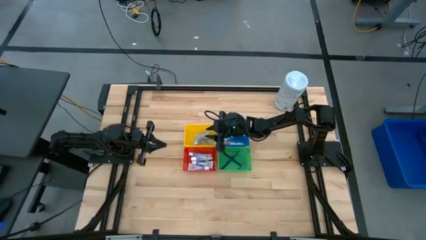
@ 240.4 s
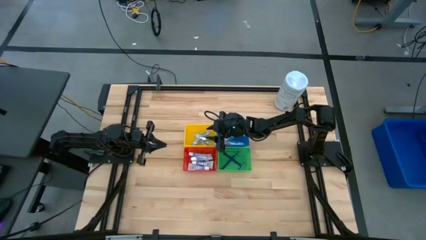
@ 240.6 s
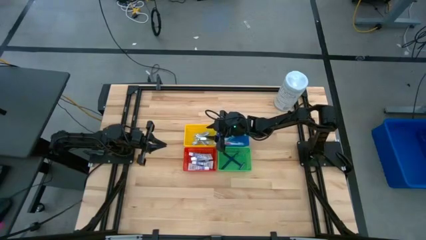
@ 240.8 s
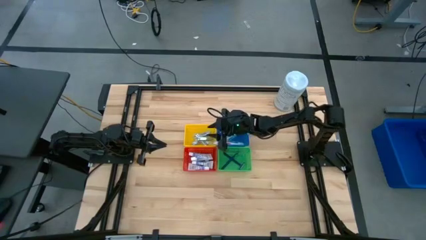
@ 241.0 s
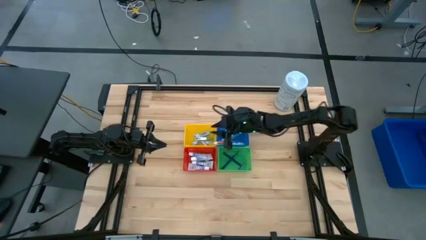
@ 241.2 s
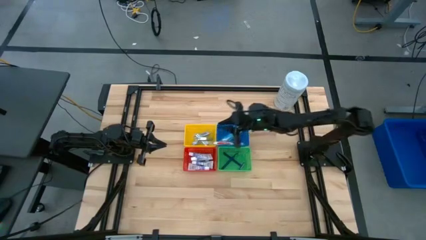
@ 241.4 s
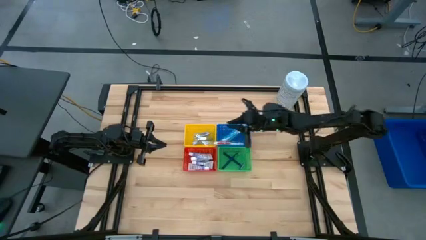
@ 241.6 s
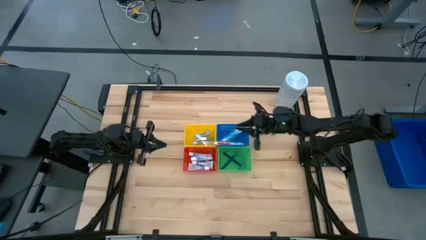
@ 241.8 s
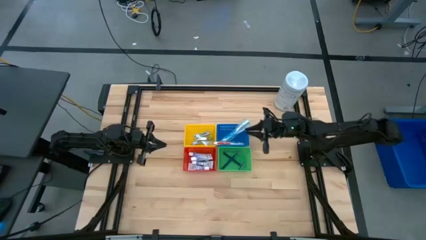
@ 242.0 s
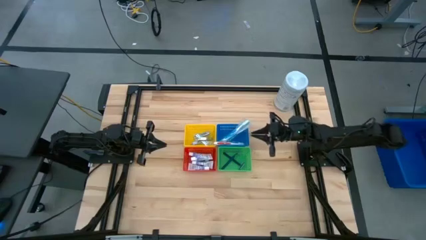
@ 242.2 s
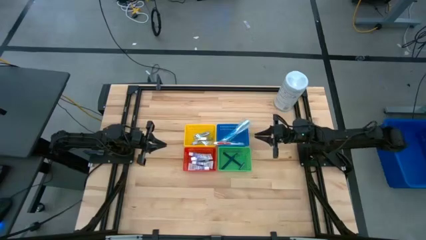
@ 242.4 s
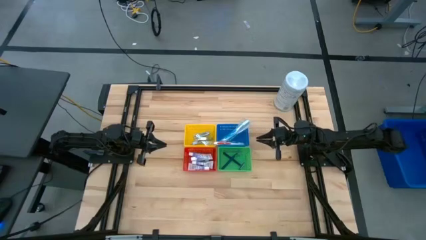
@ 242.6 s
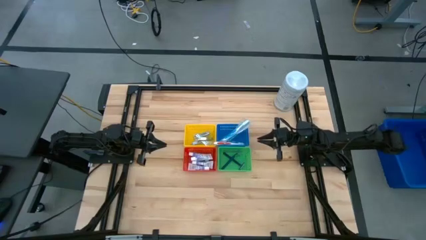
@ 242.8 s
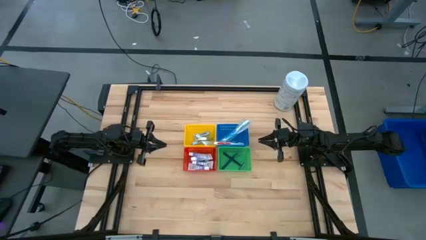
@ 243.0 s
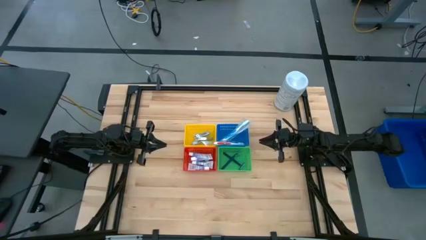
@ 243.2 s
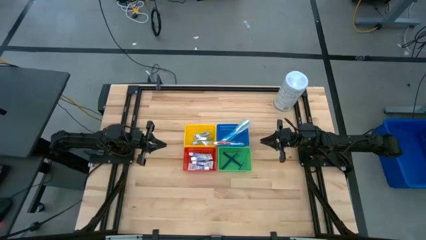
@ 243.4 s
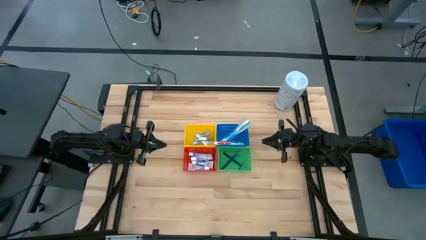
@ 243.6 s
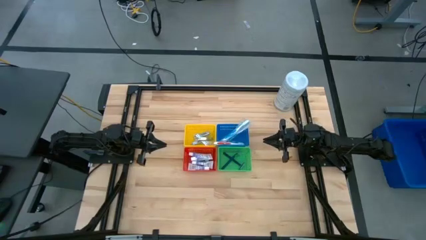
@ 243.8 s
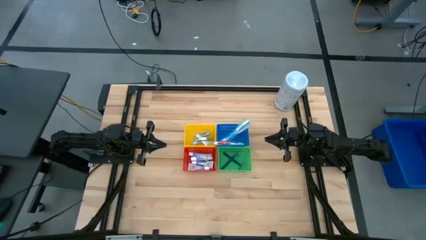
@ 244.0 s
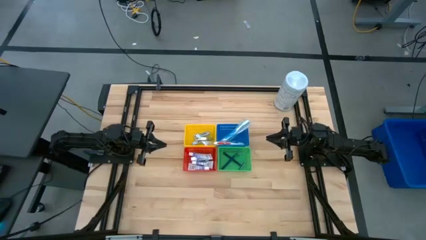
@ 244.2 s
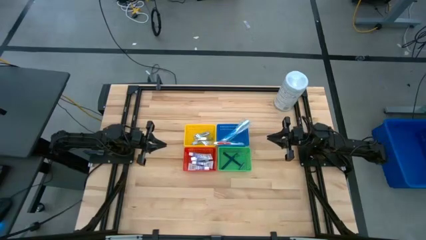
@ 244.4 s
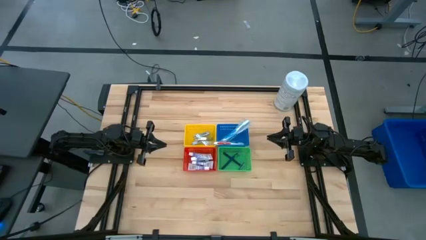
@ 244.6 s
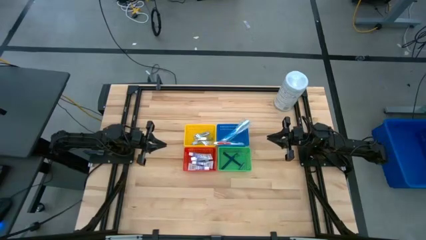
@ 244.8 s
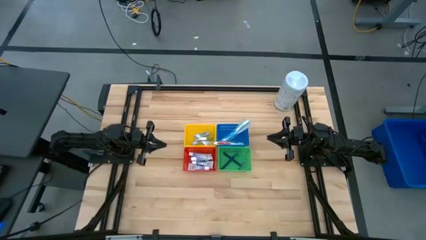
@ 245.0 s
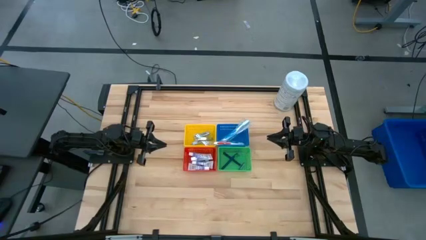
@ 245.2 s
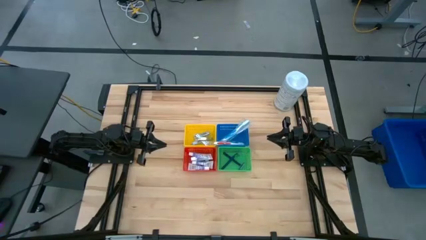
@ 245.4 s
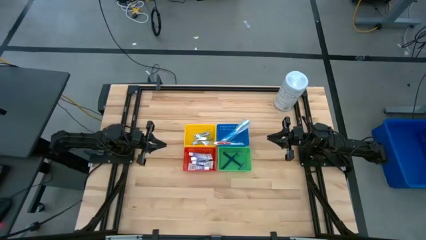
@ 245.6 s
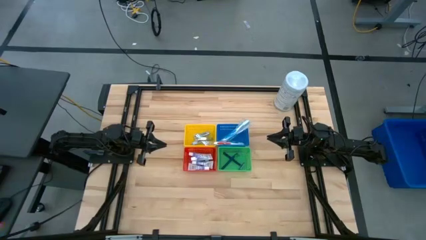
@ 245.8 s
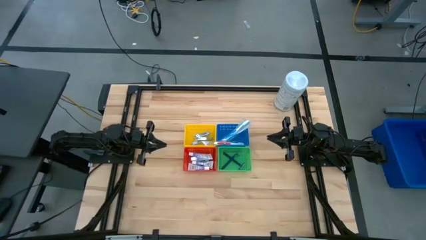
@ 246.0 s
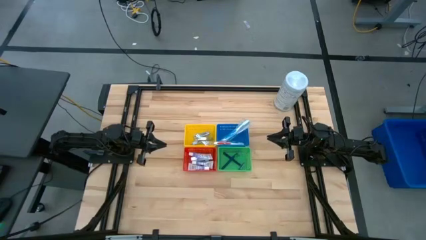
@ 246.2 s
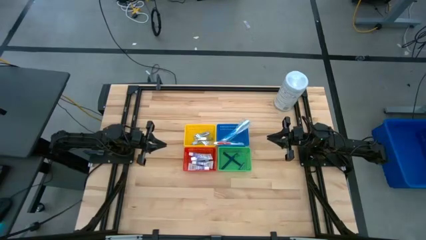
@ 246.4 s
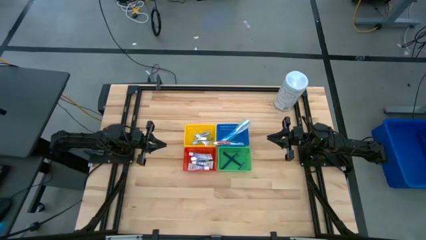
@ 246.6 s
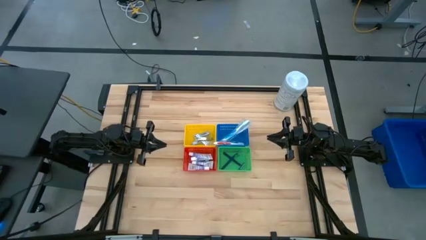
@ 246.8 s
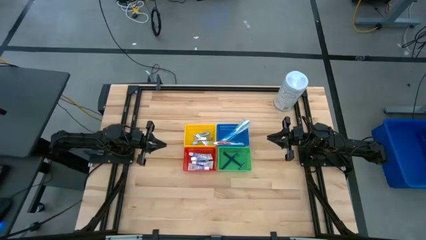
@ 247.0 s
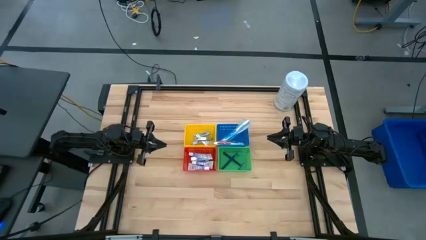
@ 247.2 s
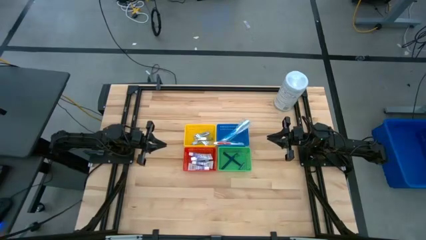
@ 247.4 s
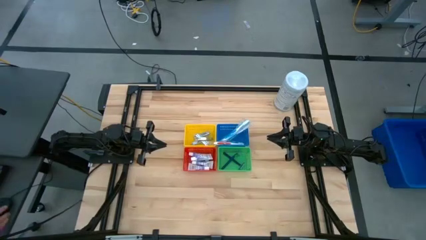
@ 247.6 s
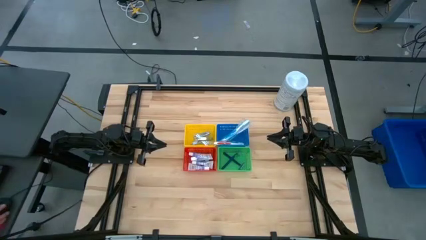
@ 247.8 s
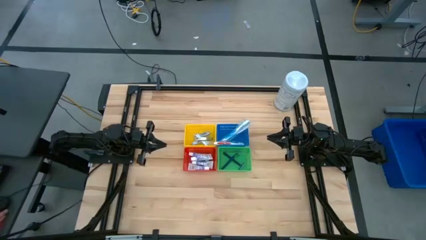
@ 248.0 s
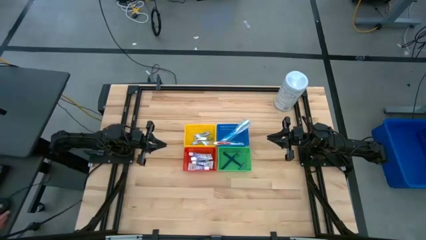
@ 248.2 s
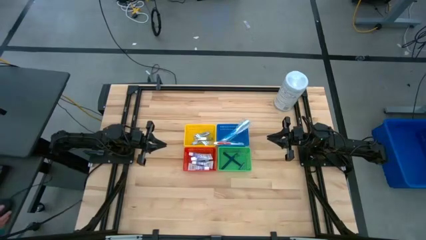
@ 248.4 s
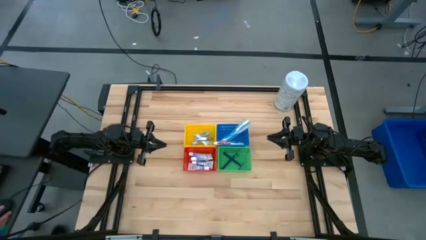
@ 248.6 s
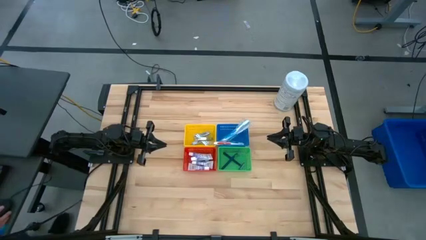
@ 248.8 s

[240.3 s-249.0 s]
Task: Pick & Place Travel size toiletries
Return to Home Position

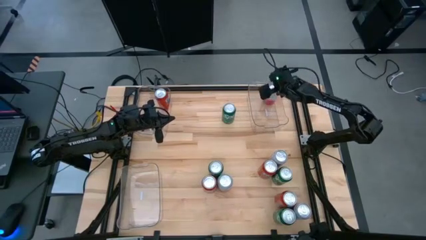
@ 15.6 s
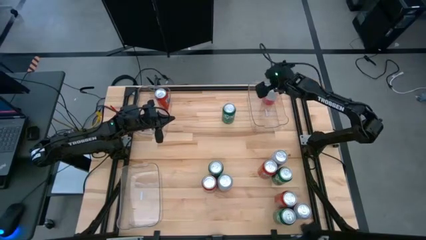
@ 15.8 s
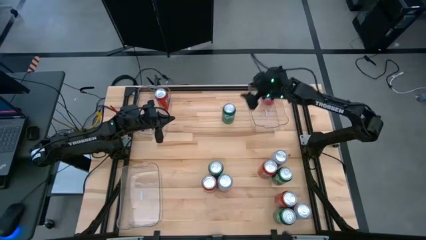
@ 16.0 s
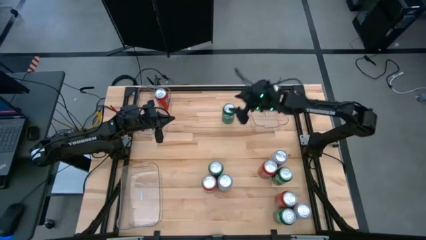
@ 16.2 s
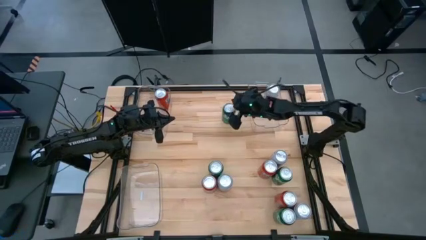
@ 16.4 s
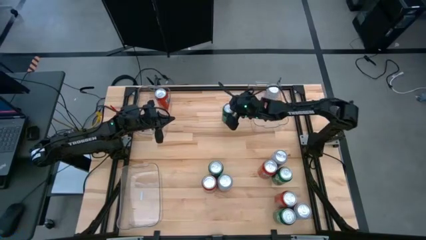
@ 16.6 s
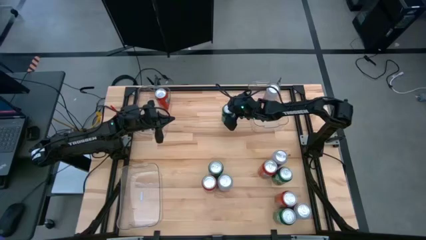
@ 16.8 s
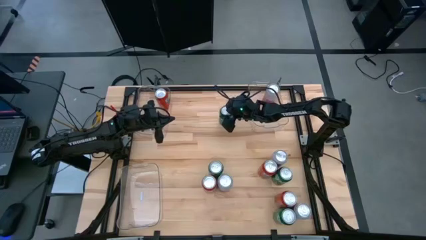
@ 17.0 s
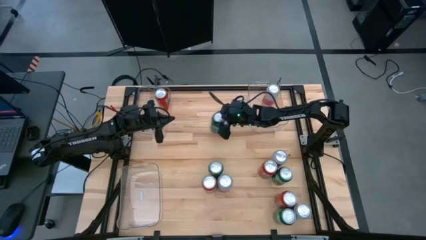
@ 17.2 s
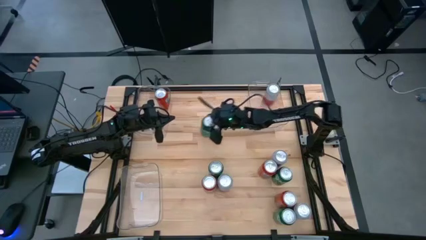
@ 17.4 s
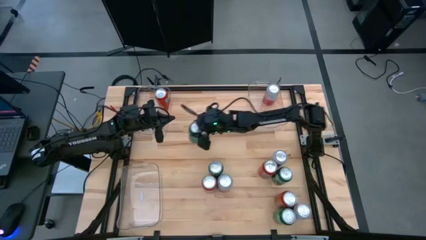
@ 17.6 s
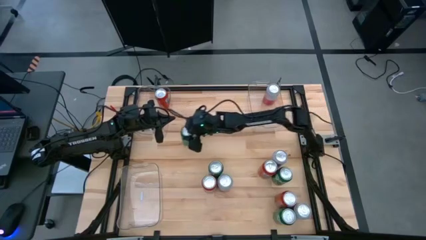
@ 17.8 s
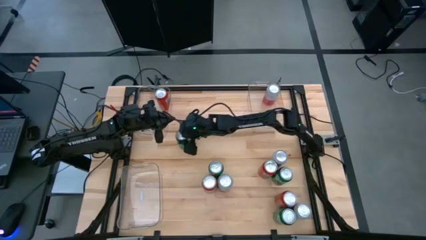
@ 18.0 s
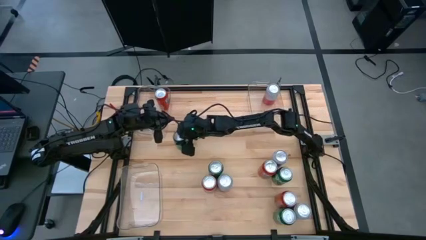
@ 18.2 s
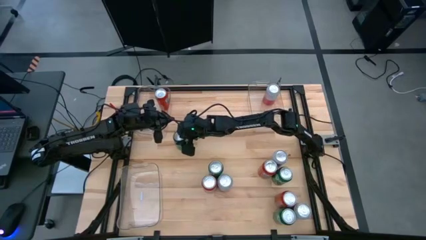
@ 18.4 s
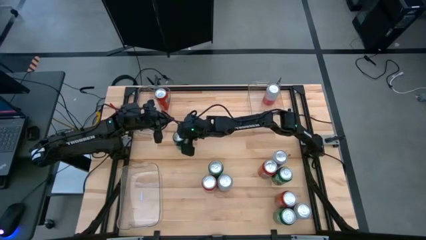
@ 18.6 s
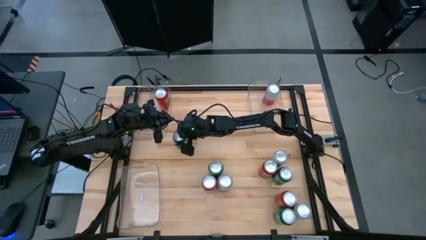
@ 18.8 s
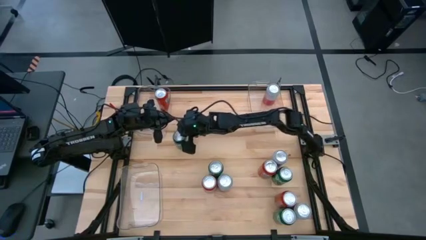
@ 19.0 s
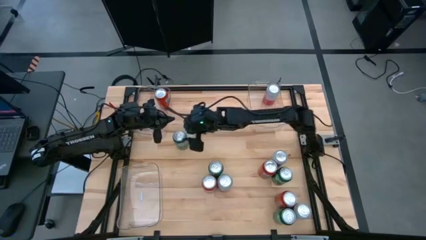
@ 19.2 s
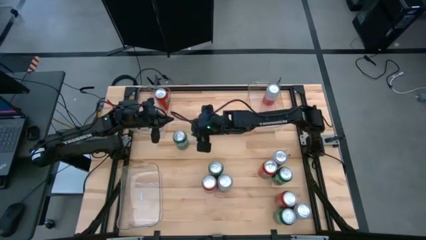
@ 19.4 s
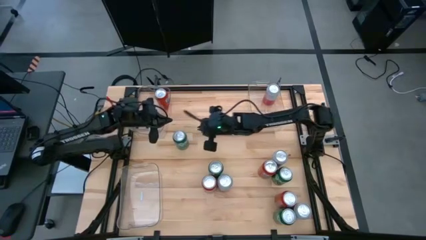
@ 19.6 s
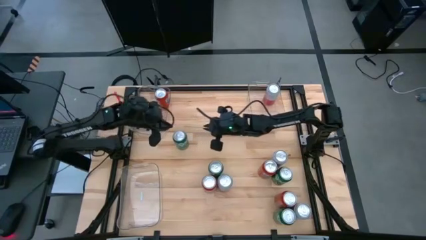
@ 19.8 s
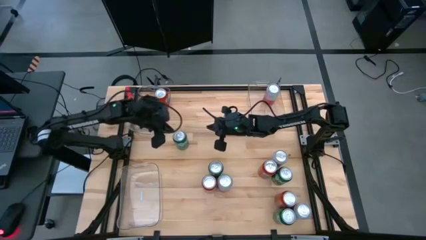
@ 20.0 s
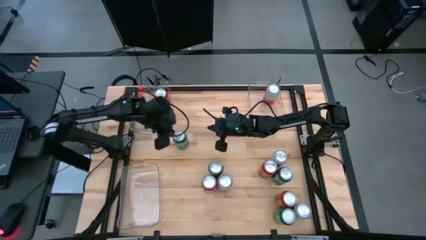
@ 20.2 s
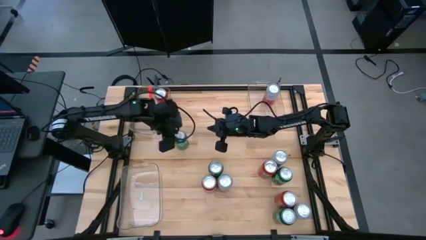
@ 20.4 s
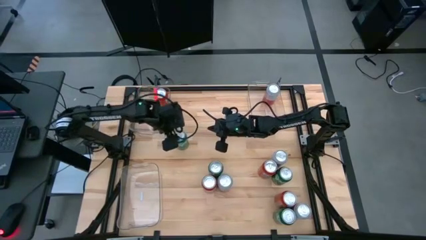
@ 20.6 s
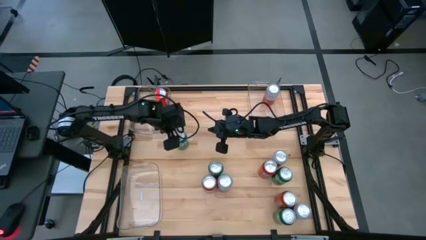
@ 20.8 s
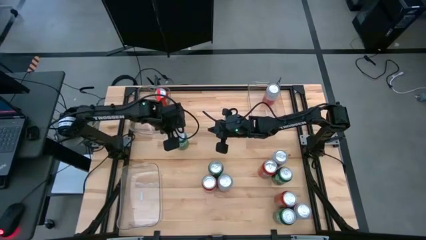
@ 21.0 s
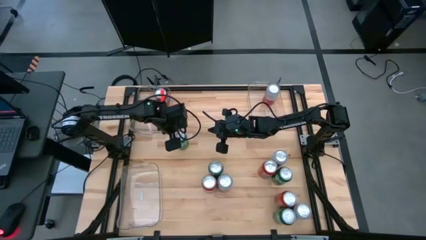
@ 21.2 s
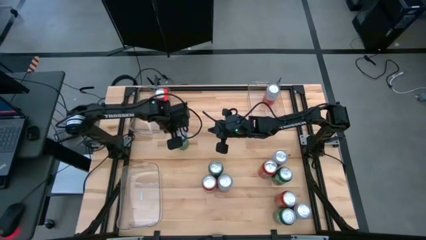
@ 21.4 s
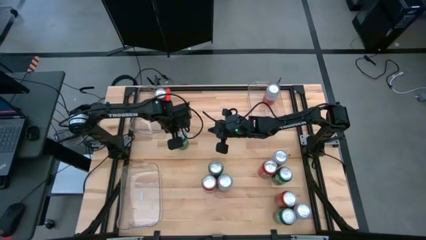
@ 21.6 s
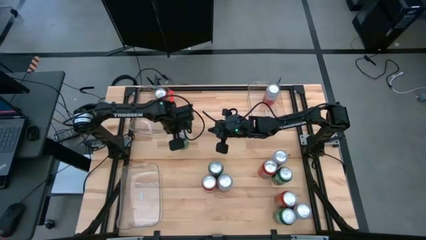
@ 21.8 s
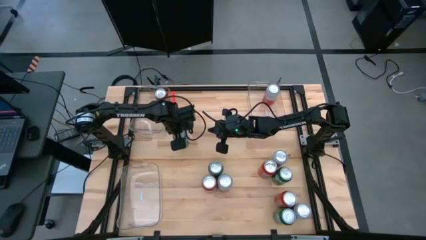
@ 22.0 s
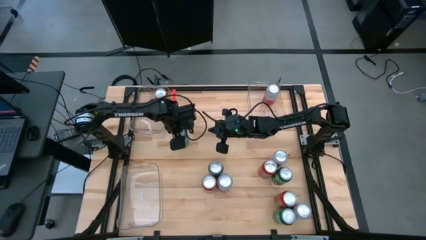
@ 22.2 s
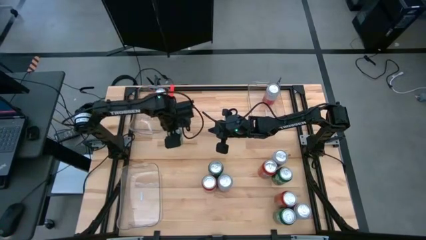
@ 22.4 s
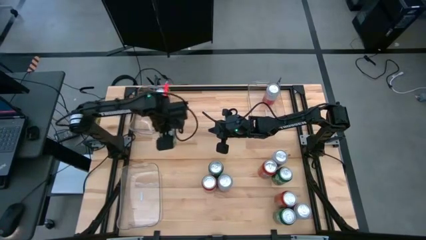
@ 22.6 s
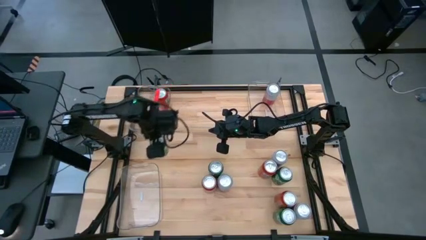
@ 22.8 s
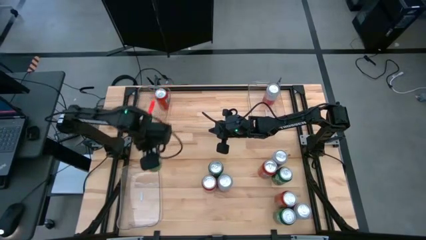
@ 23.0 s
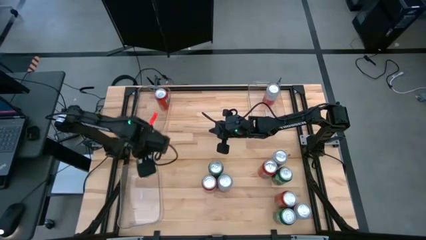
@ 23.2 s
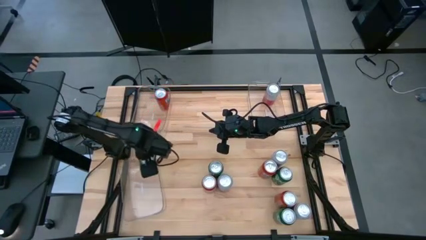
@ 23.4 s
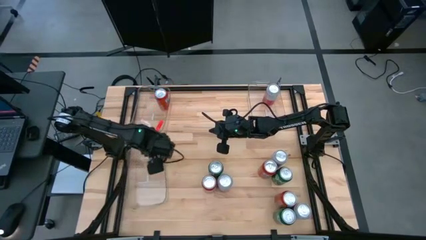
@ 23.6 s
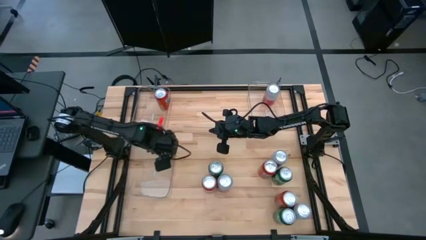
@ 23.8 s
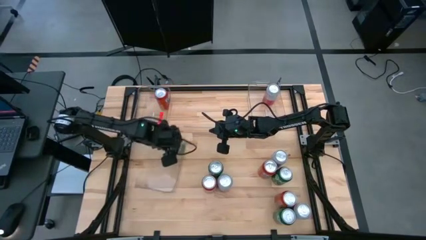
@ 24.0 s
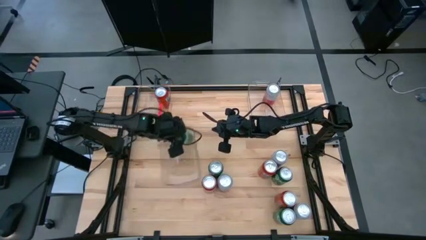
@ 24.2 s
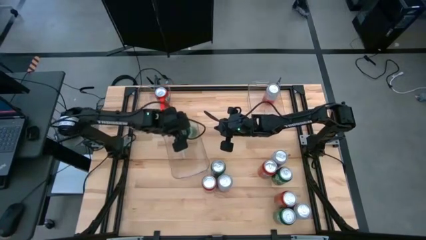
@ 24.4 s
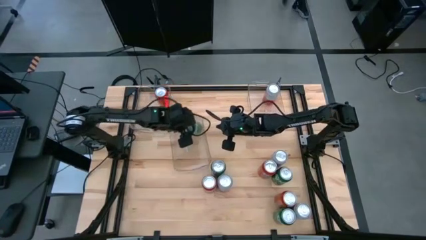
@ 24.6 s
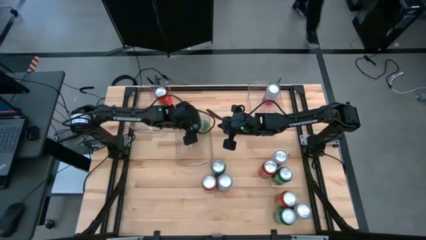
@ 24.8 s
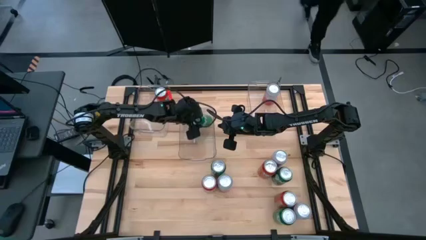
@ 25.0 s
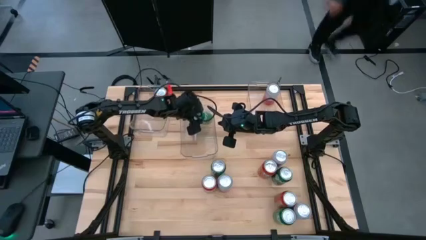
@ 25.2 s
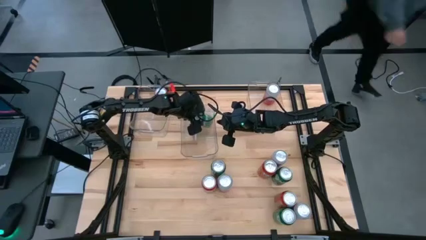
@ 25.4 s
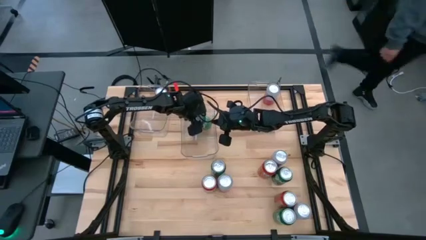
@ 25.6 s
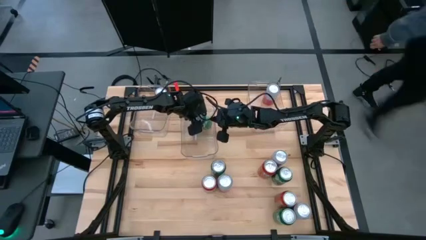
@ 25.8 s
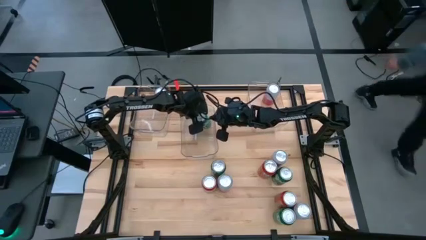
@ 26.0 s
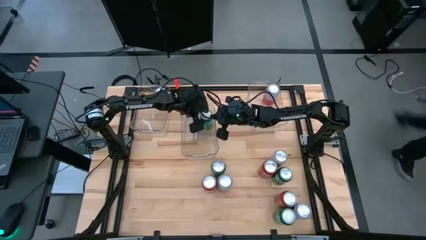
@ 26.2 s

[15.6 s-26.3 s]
Task: Sort soda cans
Put the top green soda can into the bottom transparent bin
